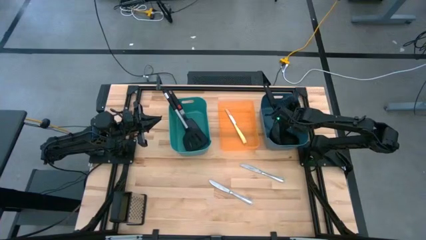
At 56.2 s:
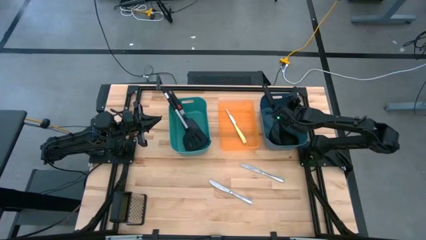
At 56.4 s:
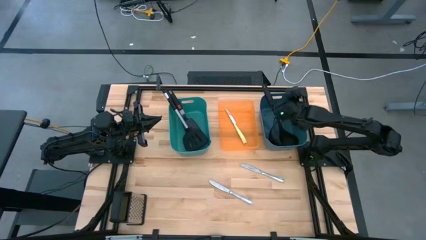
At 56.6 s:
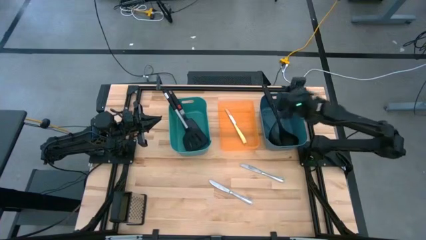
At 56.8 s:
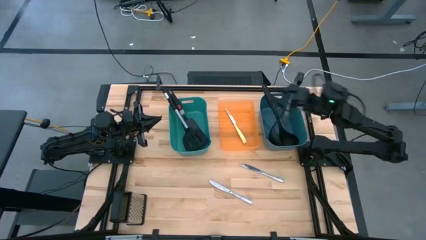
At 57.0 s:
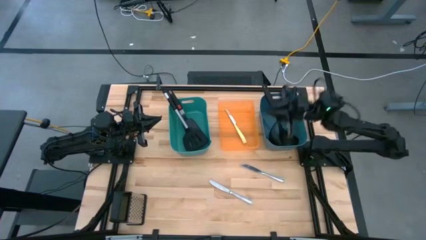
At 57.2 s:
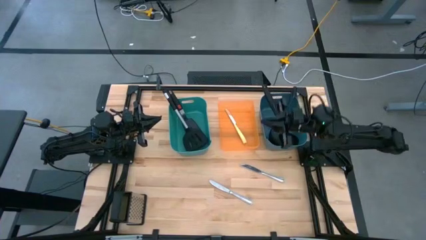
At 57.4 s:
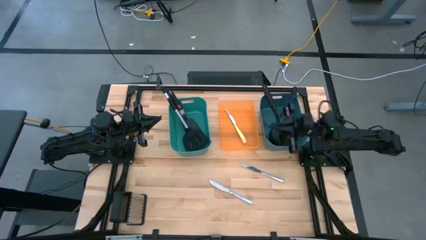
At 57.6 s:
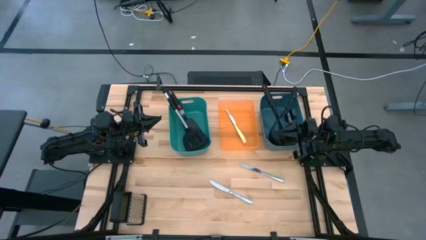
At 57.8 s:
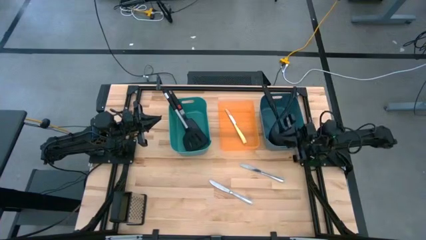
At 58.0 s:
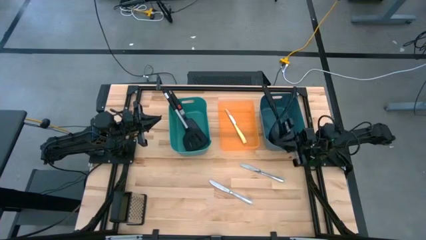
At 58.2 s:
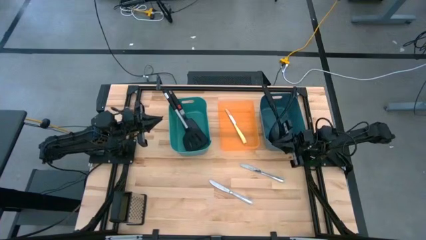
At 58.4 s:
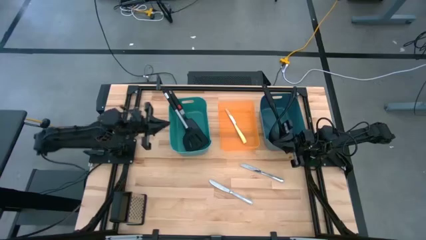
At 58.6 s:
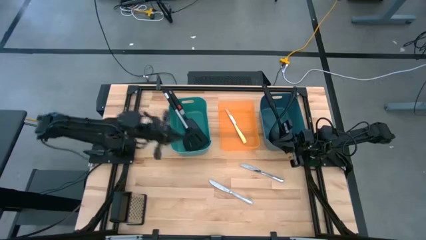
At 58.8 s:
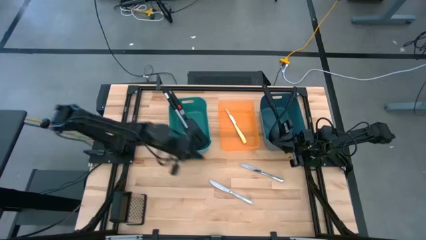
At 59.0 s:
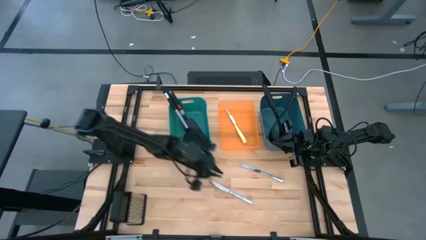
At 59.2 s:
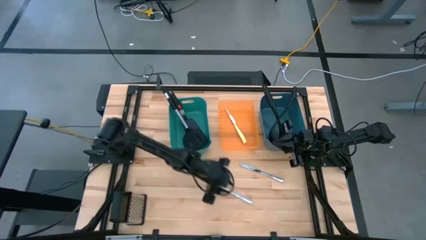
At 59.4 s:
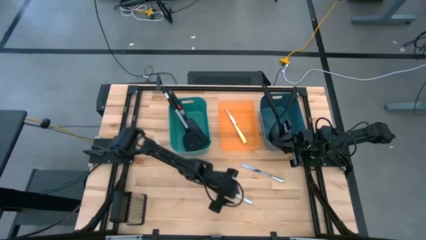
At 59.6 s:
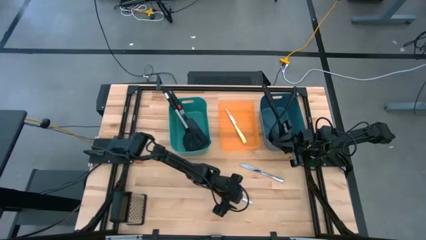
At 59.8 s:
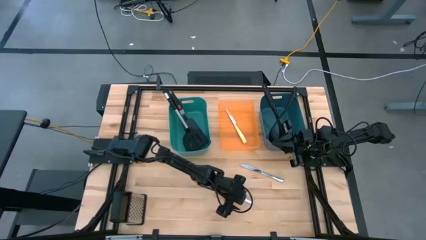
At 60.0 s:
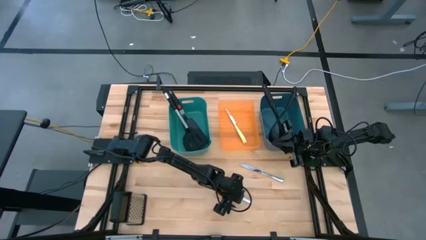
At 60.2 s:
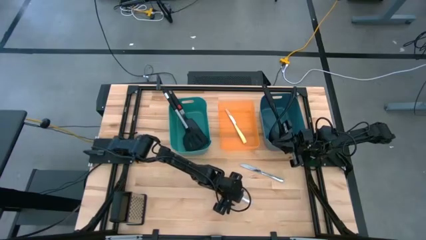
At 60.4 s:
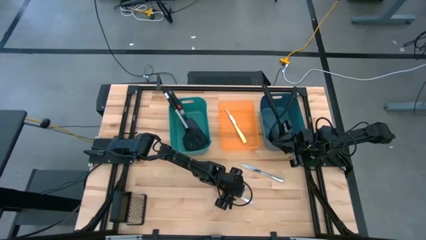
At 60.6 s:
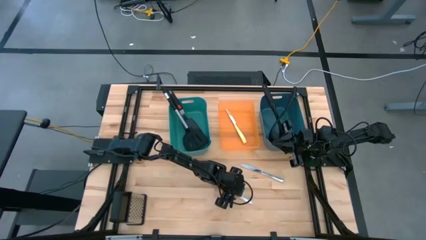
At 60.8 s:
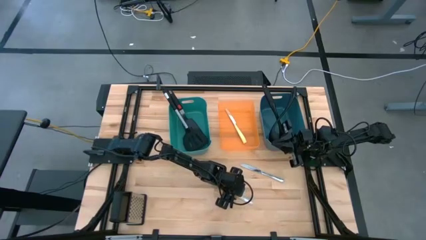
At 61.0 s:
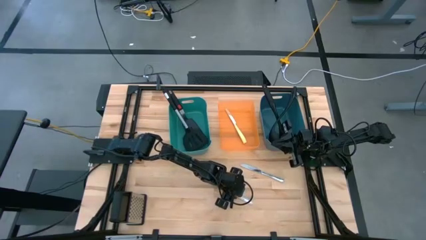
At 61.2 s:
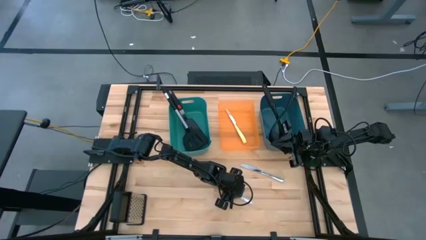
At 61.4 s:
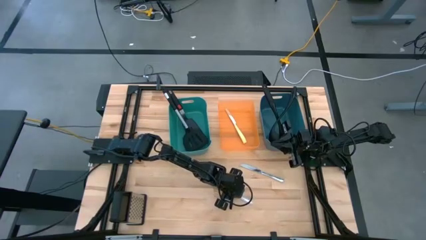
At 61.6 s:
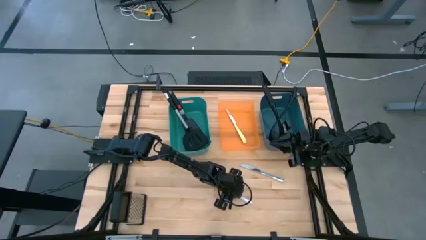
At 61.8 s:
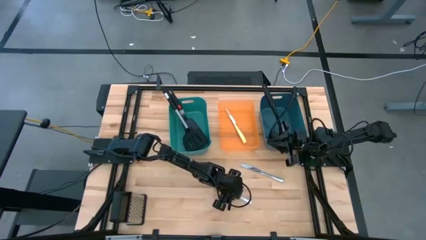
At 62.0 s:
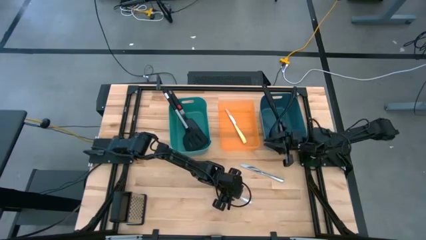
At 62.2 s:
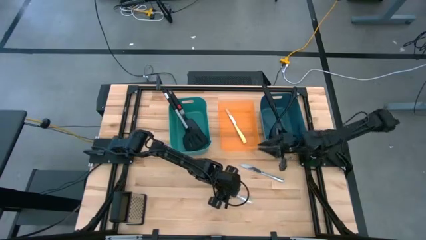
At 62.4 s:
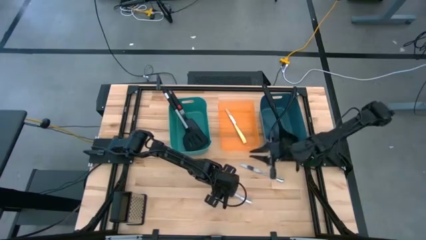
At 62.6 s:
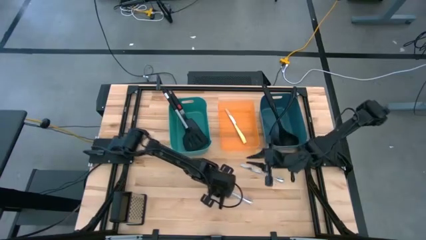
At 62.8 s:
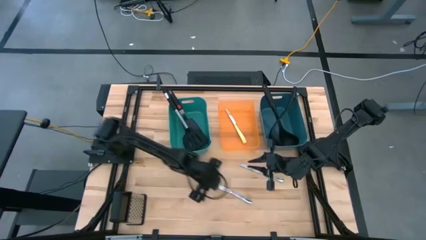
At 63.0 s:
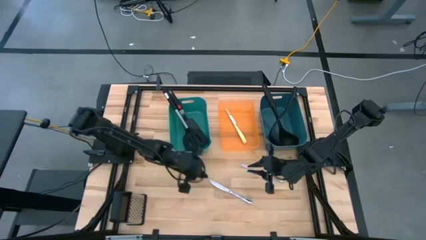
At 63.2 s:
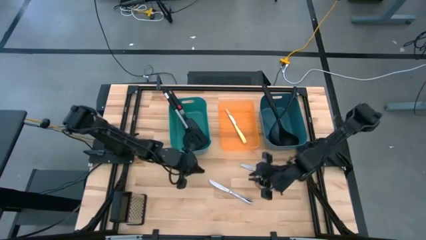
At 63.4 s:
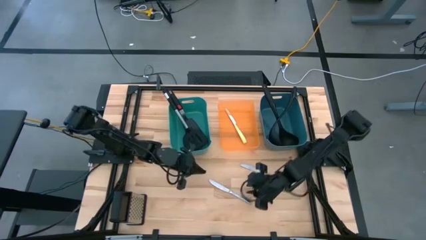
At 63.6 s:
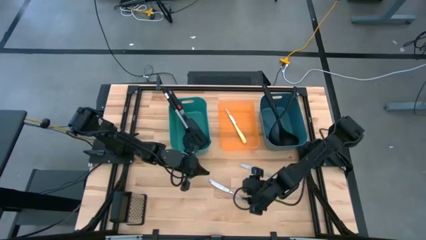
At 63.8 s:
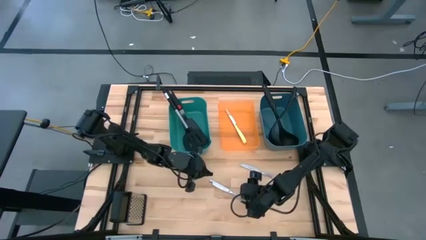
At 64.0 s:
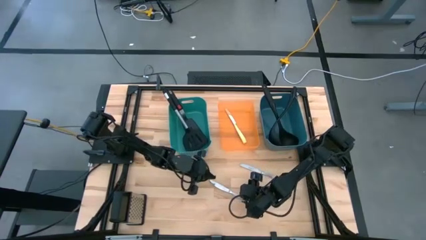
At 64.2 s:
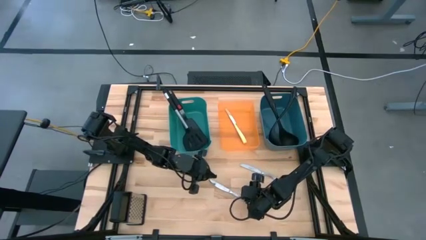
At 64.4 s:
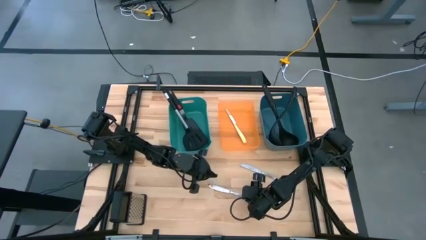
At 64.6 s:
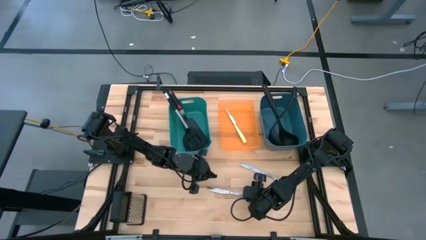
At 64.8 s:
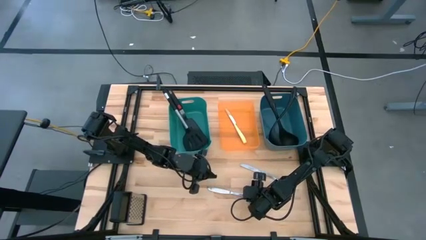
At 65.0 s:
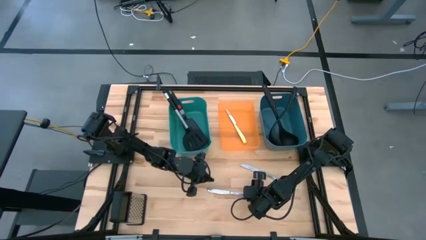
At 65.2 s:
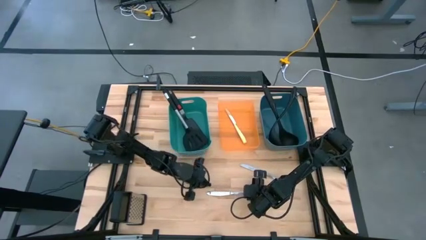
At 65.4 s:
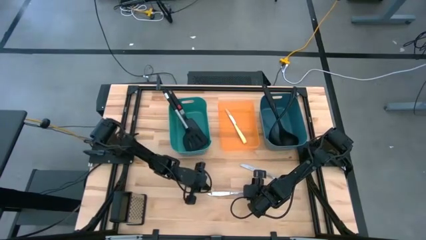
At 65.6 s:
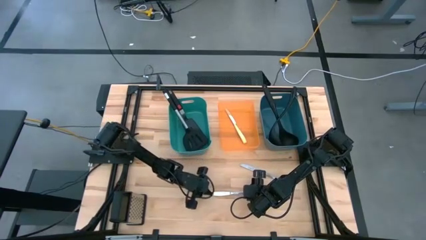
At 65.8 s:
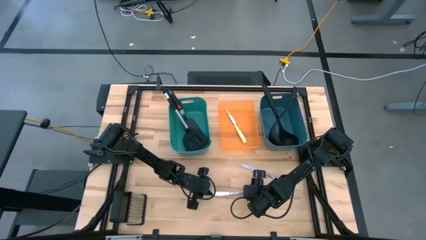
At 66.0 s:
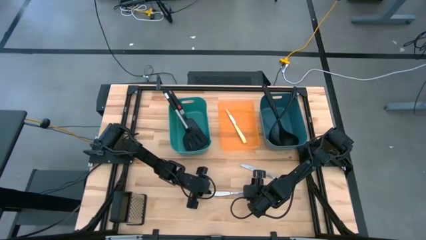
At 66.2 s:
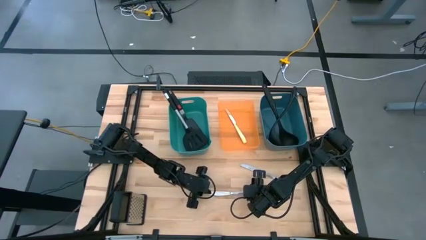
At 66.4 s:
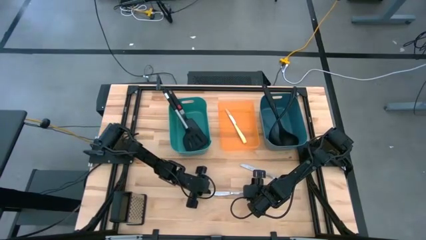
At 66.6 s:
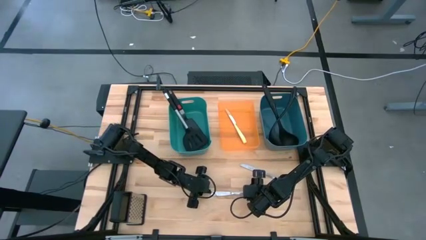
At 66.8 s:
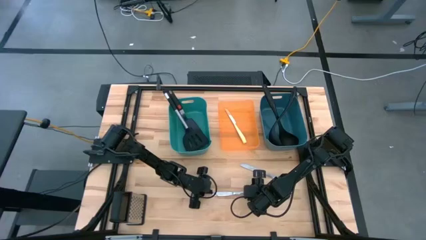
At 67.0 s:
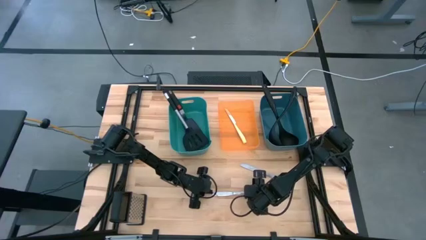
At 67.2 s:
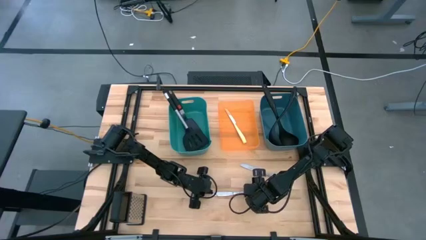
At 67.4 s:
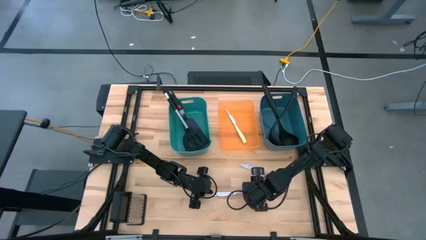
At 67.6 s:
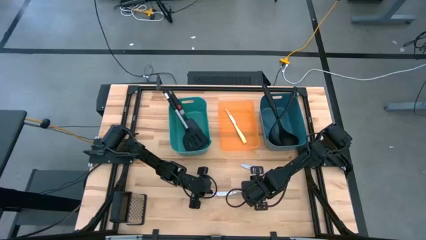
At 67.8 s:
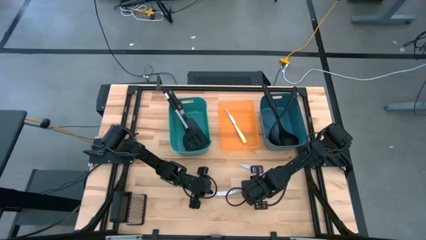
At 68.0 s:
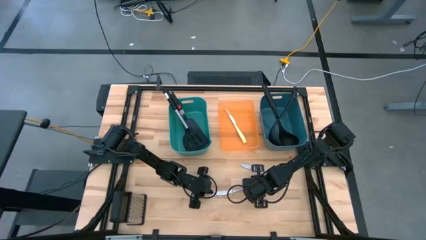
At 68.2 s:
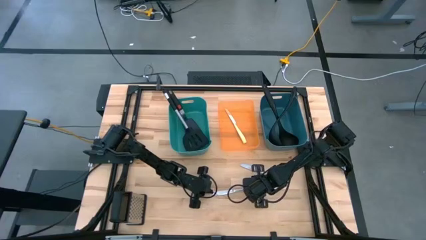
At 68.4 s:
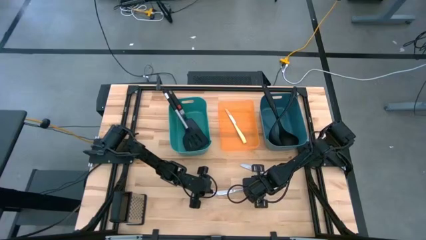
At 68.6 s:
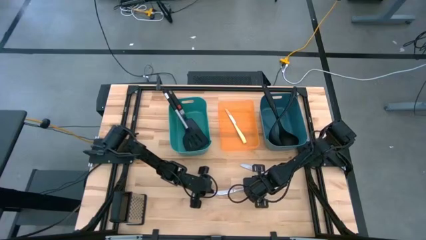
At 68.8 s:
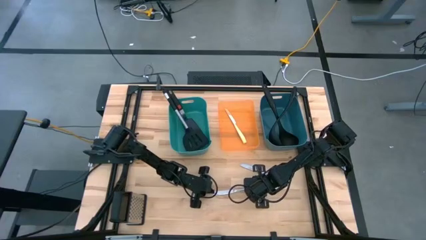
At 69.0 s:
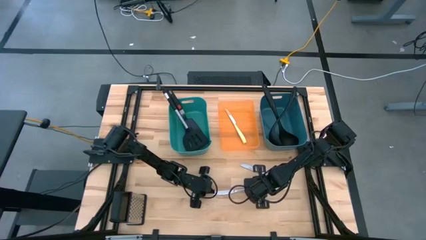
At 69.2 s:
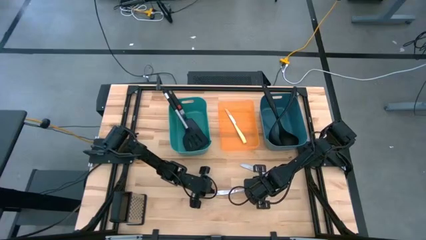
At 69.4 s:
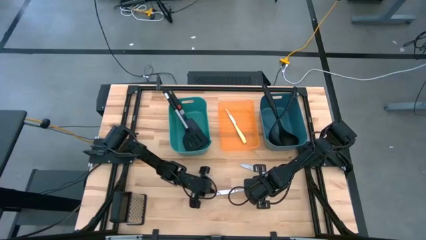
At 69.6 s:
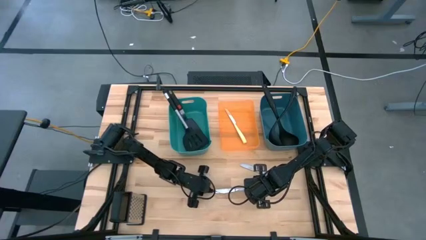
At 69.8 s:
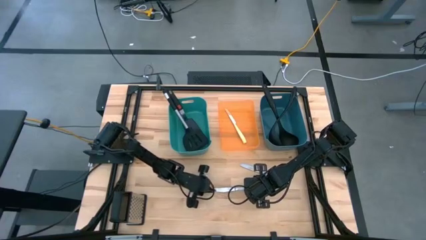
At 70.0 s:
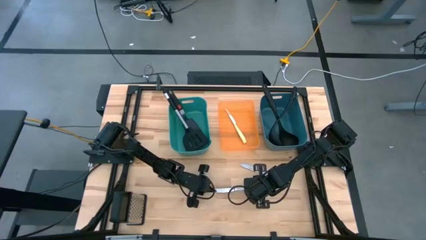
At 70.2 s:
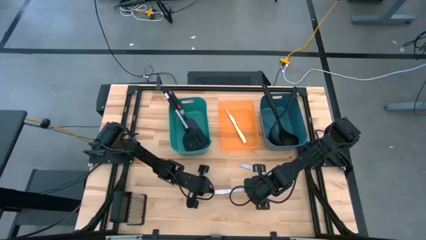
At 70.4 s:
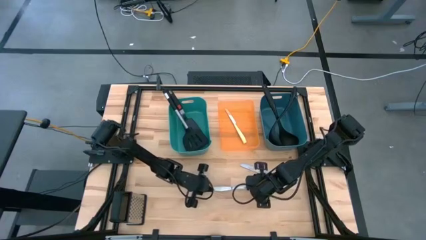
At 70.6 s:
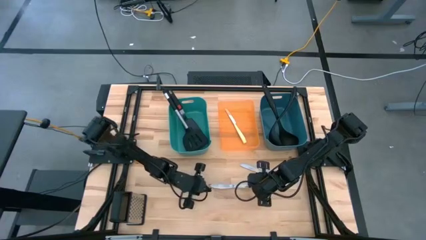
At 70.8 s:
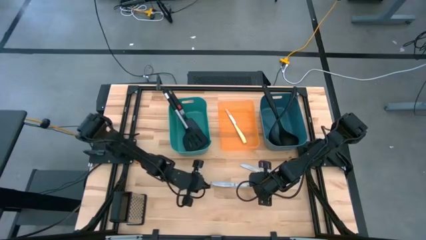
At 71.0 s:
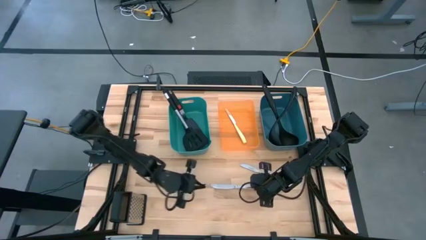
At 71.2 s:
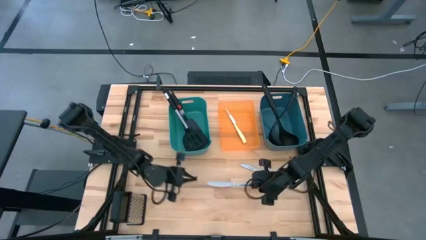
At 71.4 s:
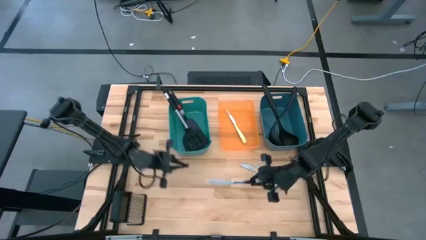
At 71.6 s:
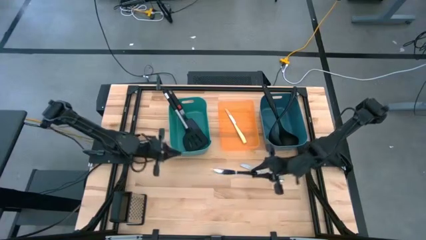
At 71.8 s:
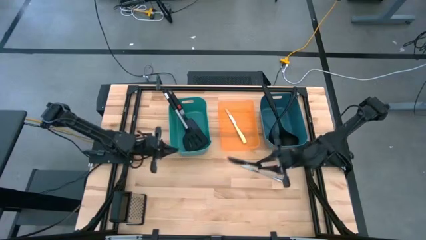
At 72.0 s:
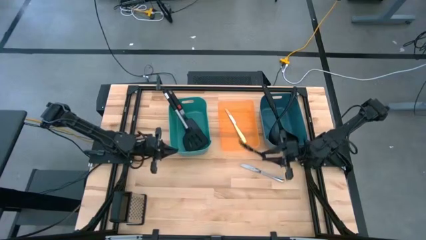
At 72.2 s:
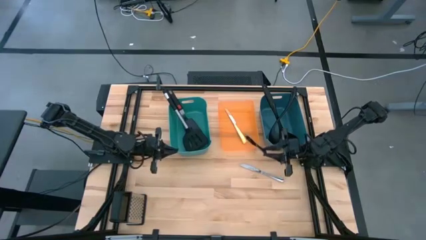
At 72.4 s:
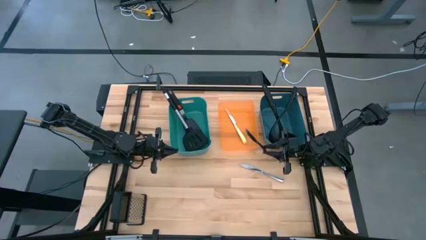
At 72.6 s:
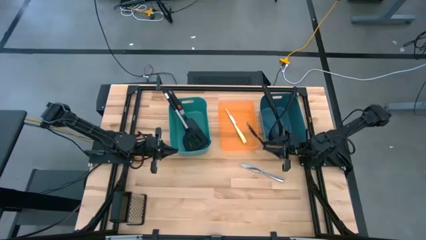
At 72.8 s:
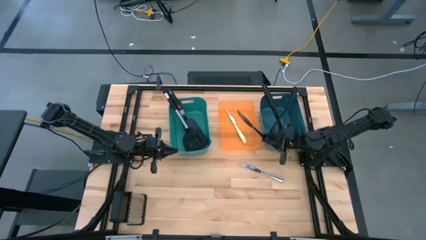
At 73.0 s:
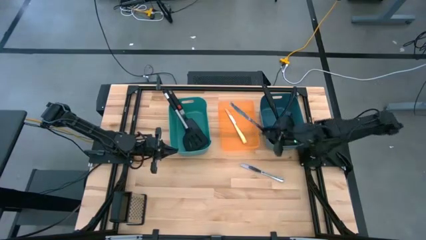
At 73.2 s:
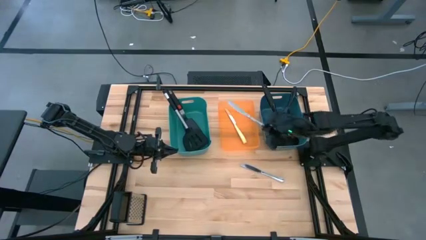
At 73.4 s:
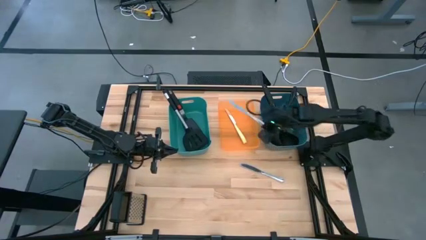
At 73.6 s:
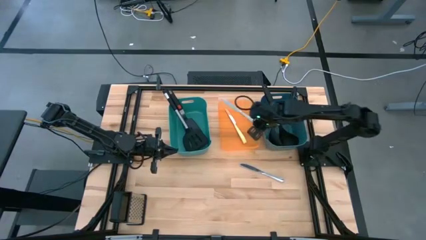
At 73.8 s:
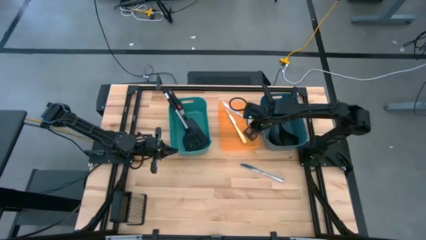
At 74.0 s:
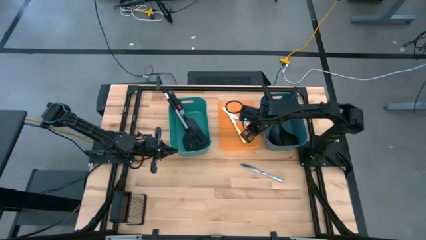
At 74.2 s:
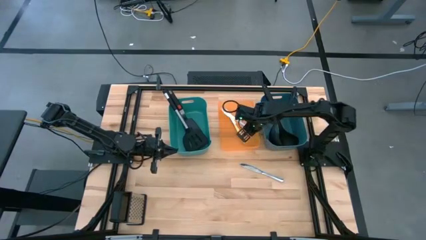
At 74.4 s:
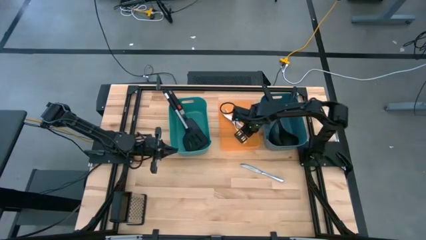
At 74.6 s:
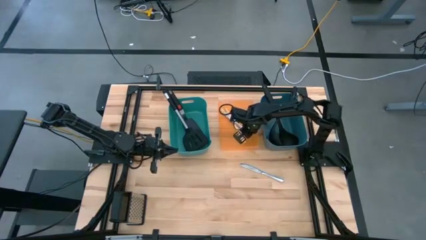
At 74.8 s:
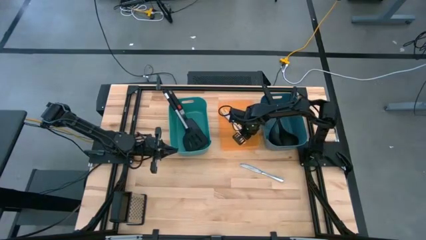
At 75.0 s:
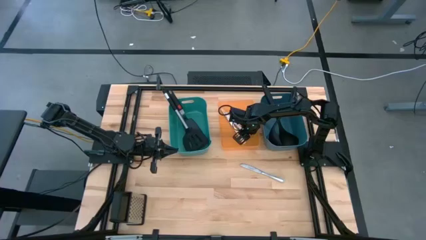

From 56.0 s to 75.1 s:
Task: Pick & Place Kitchen Items
Put the bottom silver knife into the orange bin
